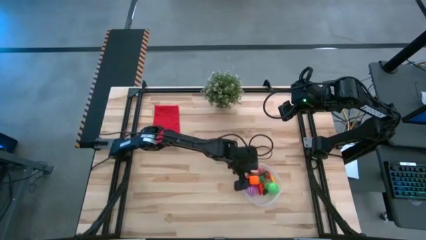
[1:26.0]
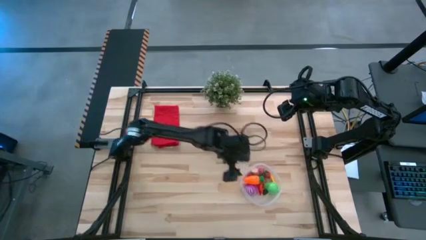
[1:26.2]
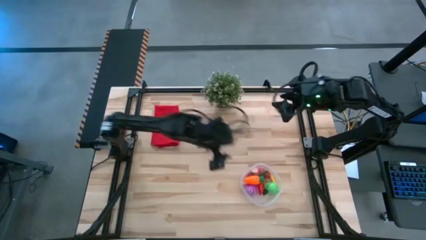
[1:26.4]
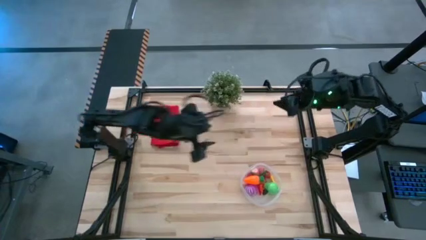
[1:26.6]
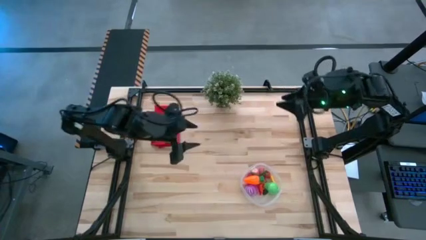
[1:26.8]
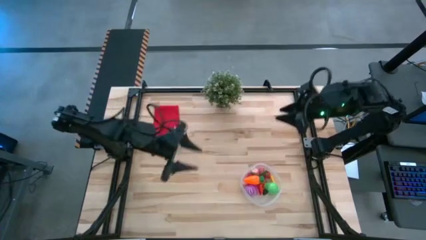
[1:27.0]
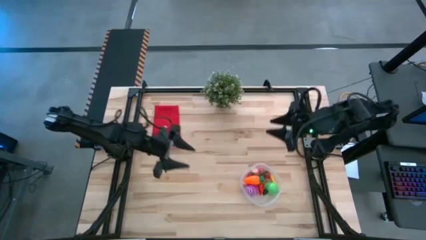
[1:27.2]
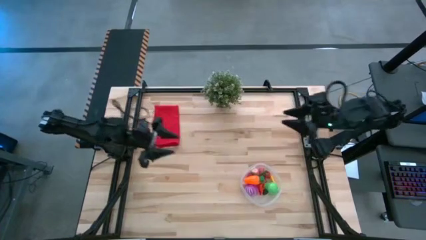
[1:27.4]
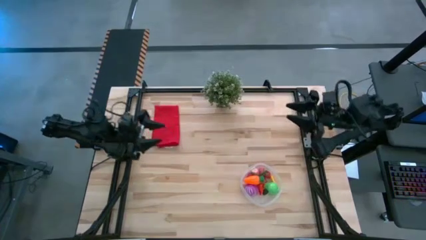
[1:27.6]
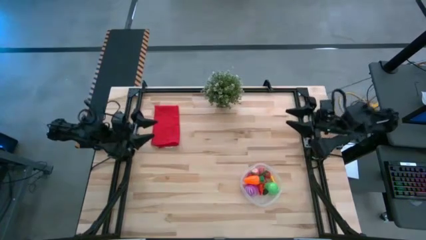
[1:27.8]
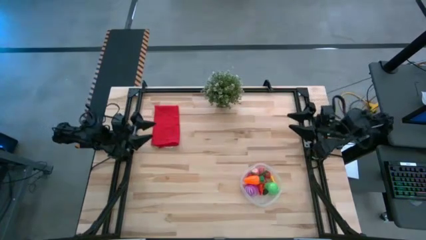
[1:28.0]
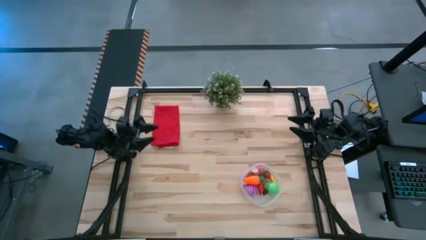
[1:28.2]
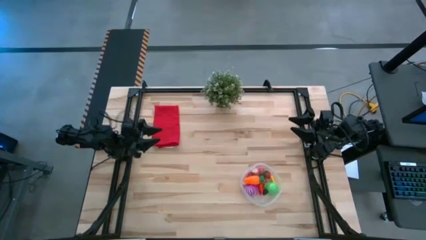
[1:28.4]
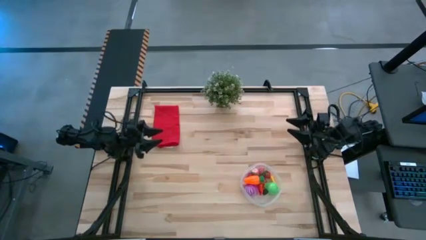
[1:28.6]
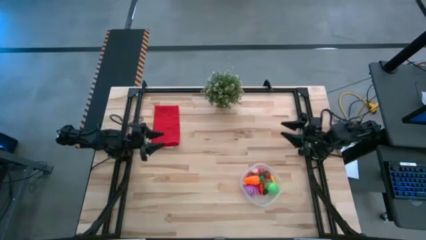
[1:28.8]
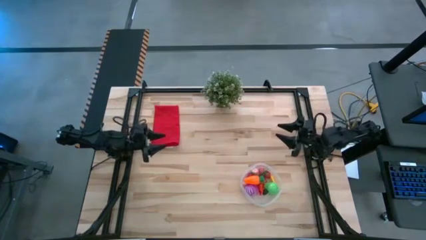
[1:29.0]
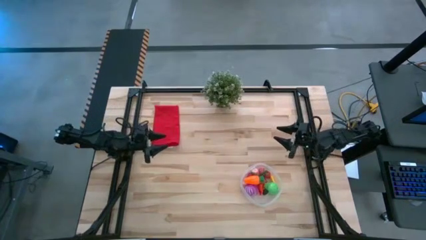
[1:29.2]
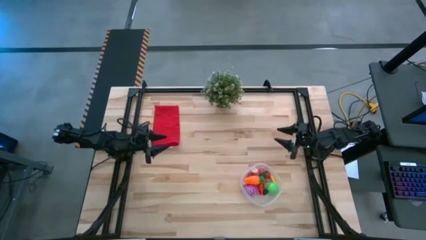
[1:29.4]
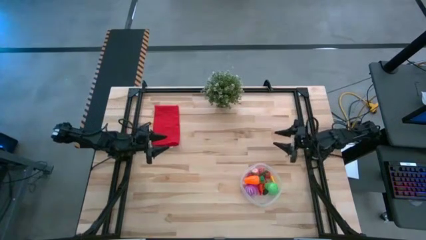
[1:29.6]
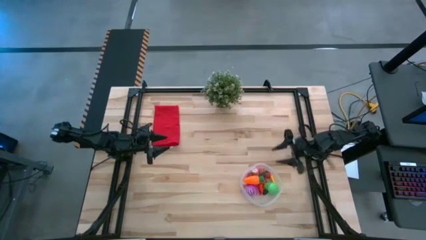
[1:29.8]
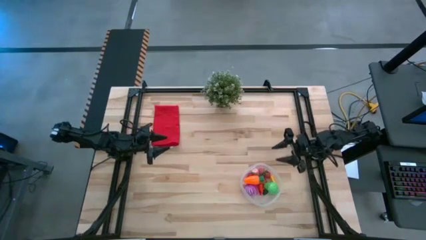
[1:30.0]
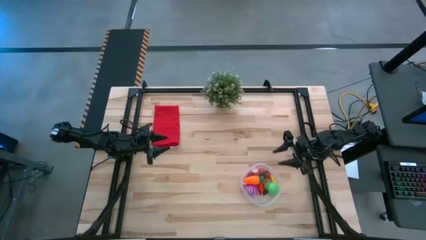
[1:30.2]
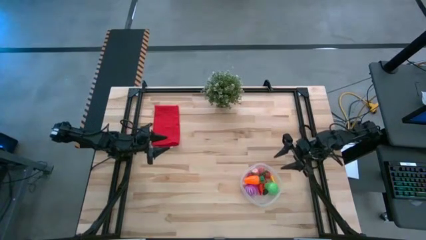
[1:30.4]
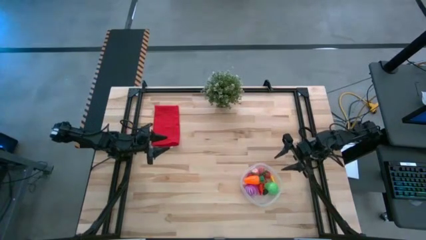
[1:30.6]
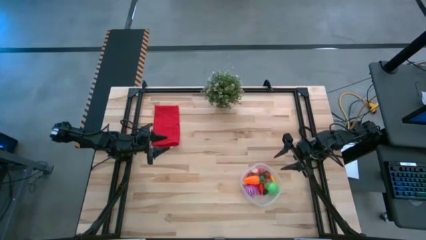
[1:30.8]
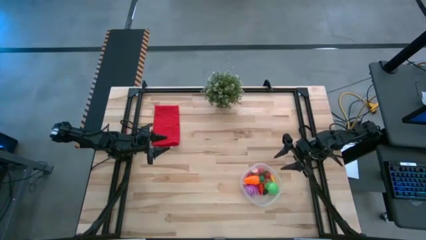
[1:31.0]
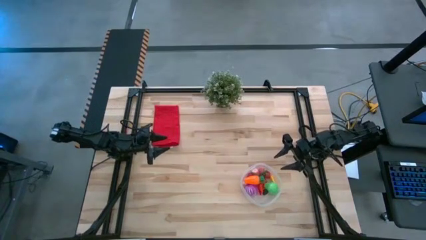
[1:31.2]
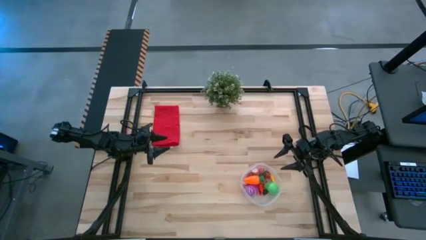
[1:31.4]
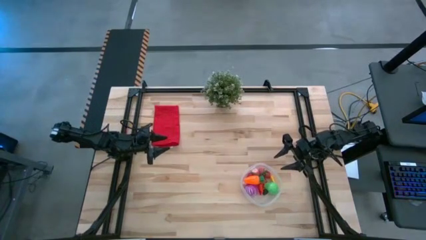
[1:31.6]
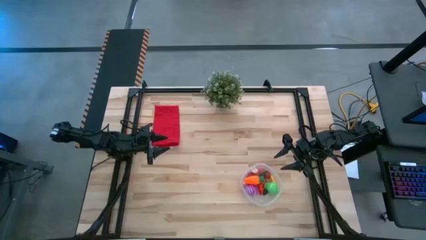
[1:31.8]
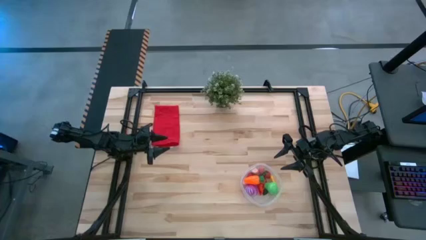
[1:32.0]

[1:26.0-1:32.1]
Task: Pick and placing Produce into tupperware
Return to Home Position

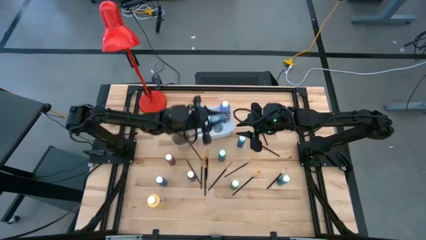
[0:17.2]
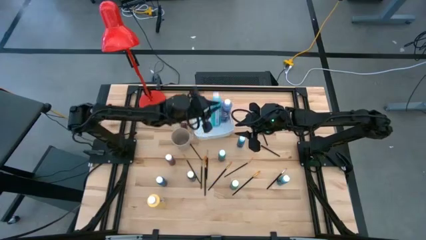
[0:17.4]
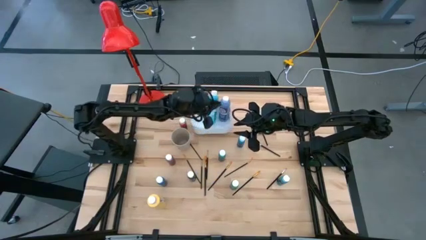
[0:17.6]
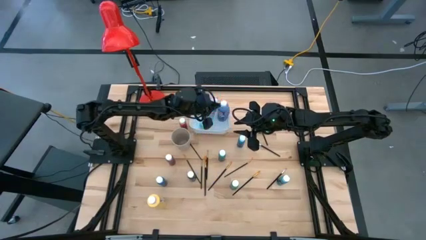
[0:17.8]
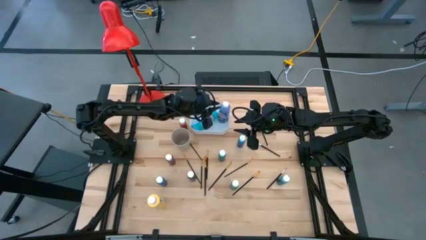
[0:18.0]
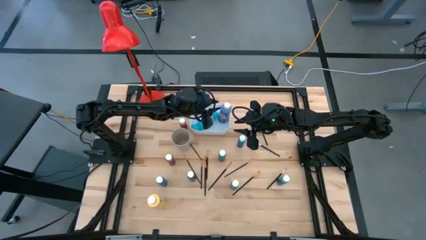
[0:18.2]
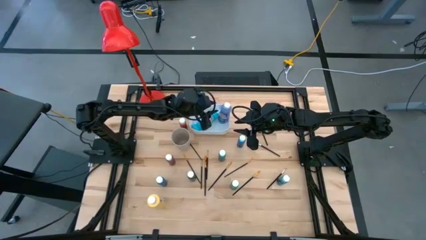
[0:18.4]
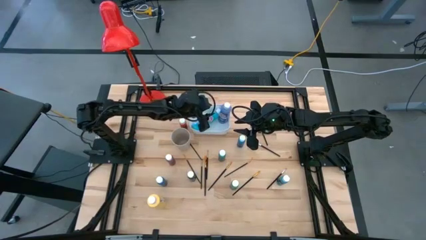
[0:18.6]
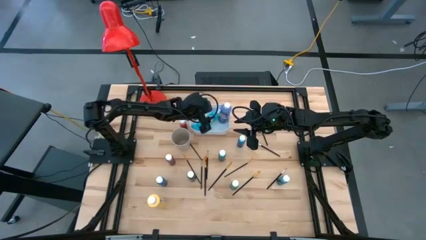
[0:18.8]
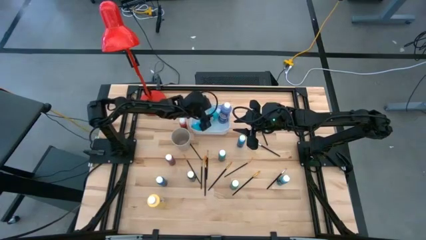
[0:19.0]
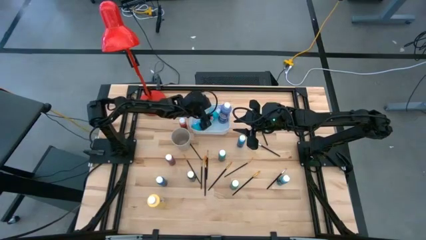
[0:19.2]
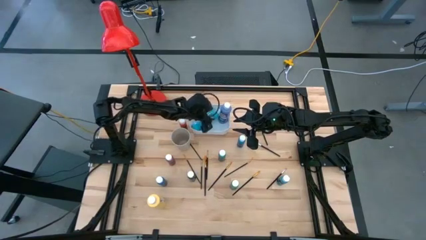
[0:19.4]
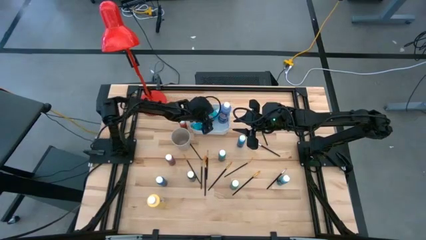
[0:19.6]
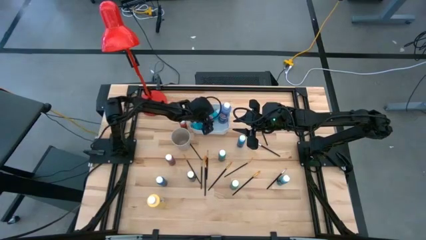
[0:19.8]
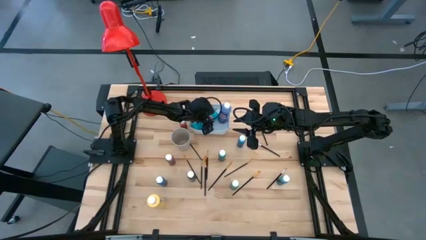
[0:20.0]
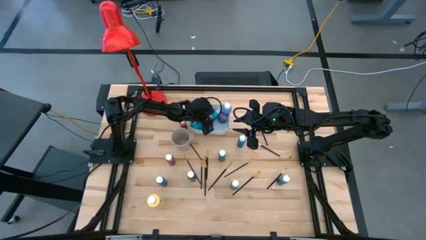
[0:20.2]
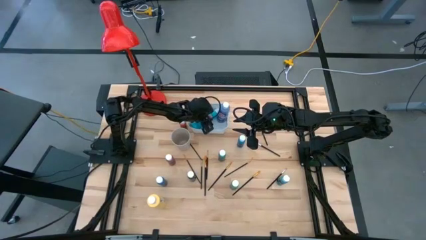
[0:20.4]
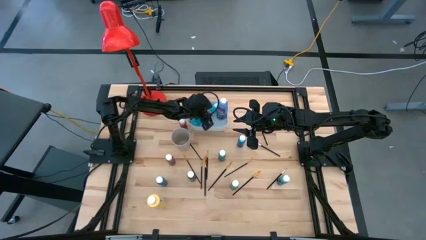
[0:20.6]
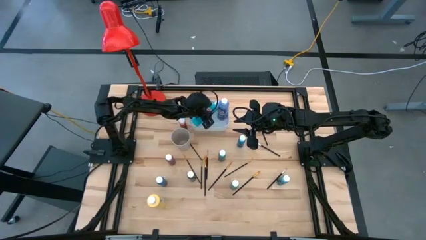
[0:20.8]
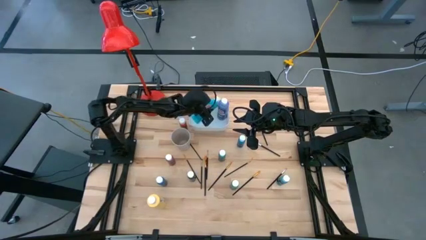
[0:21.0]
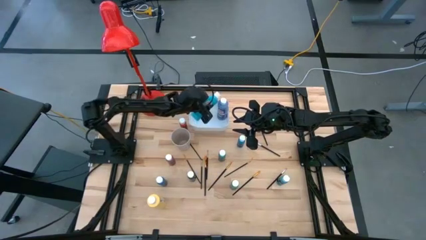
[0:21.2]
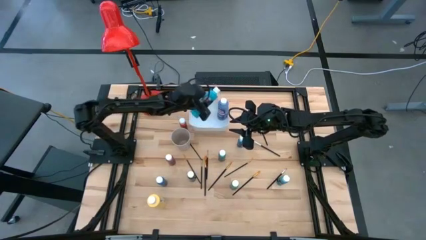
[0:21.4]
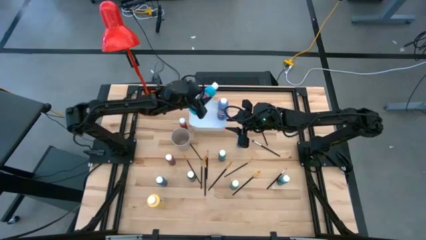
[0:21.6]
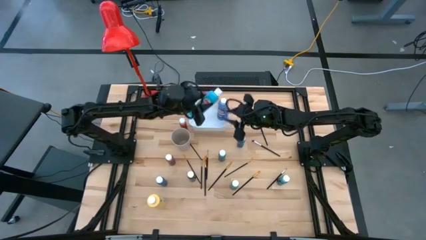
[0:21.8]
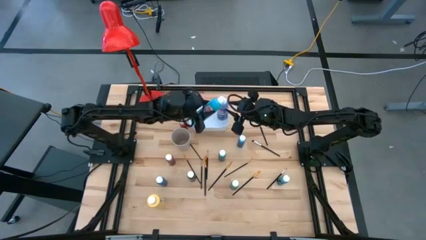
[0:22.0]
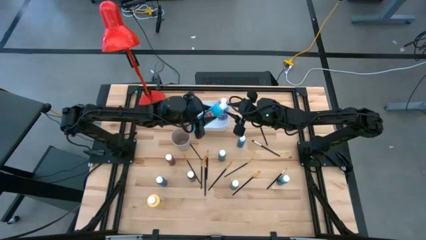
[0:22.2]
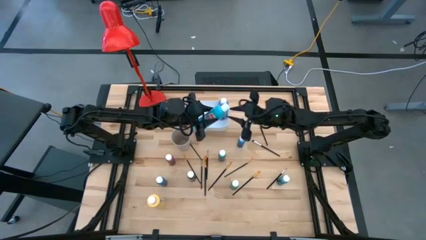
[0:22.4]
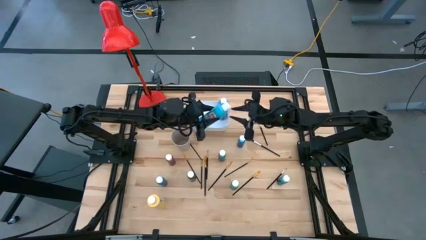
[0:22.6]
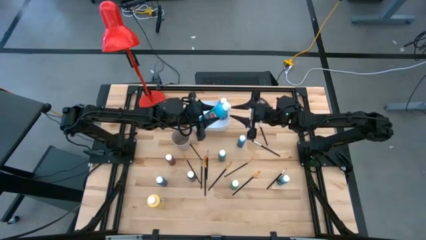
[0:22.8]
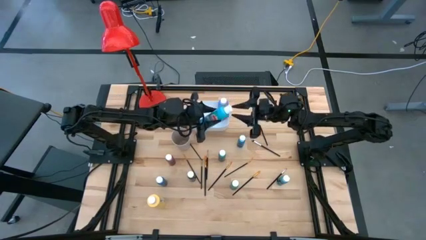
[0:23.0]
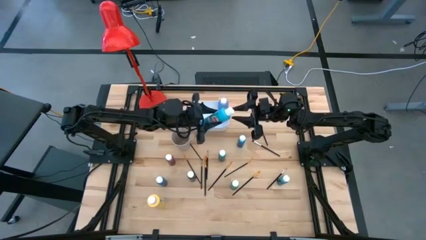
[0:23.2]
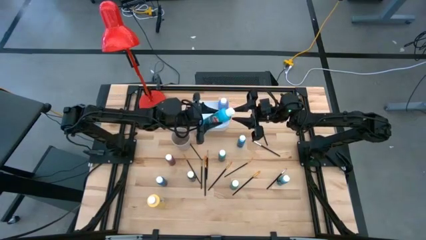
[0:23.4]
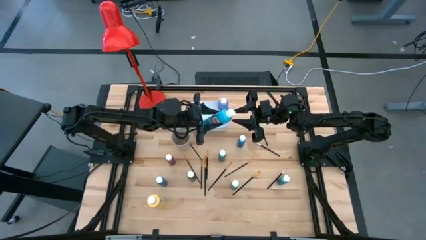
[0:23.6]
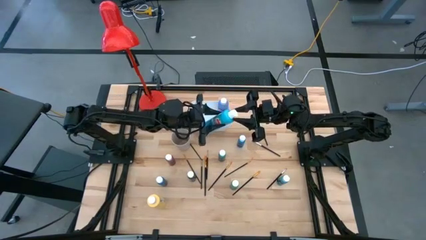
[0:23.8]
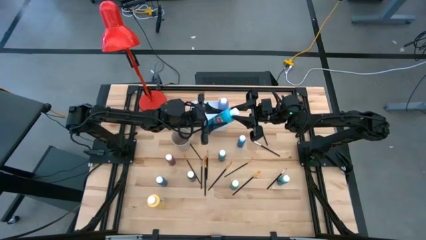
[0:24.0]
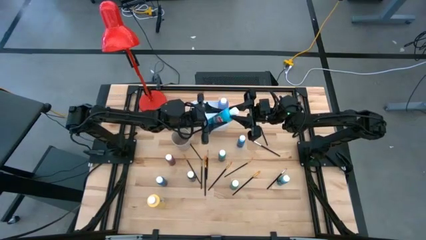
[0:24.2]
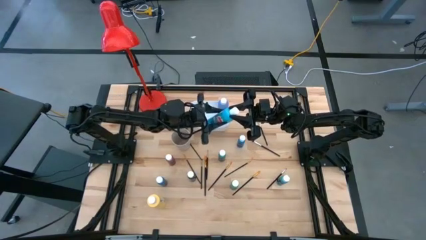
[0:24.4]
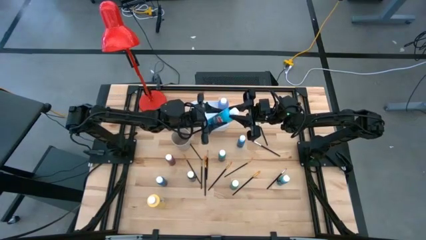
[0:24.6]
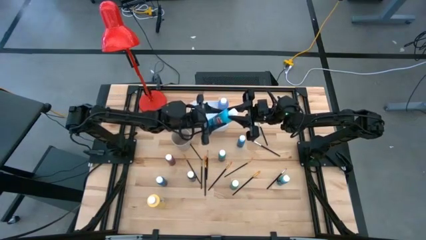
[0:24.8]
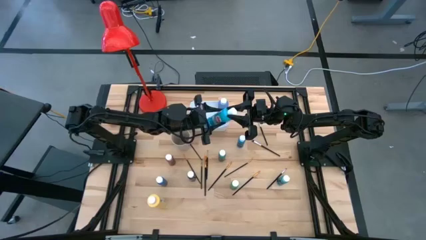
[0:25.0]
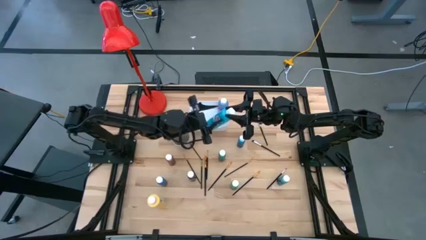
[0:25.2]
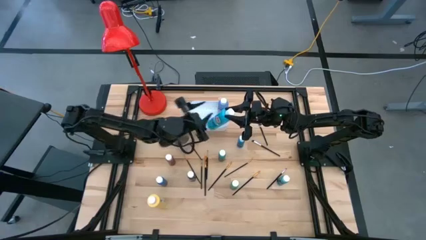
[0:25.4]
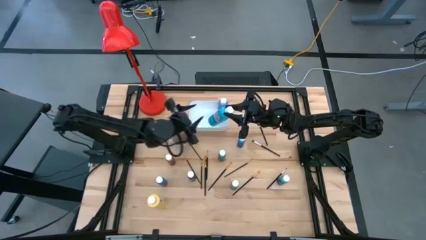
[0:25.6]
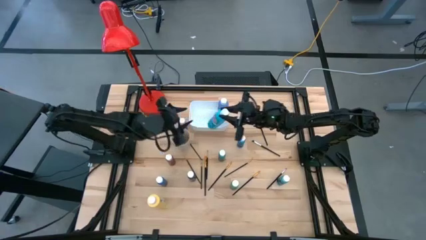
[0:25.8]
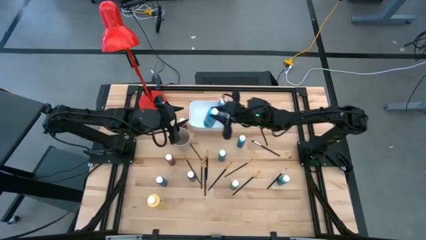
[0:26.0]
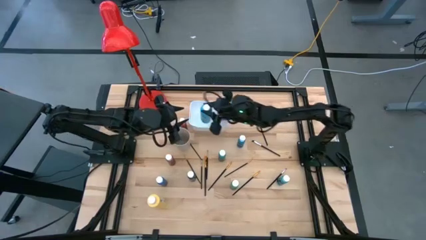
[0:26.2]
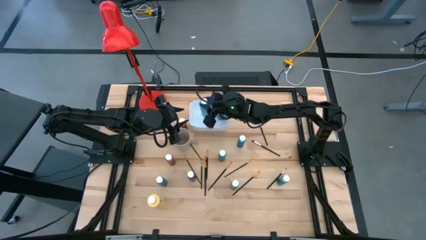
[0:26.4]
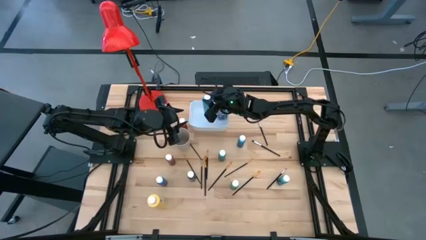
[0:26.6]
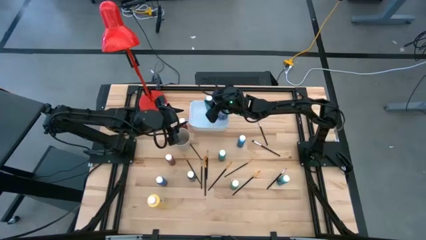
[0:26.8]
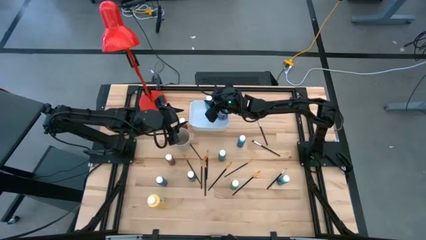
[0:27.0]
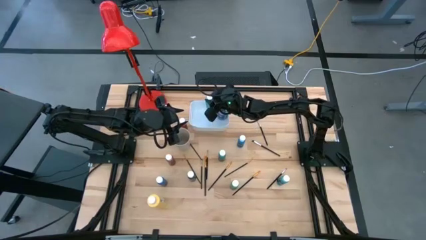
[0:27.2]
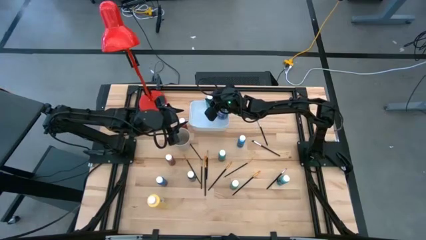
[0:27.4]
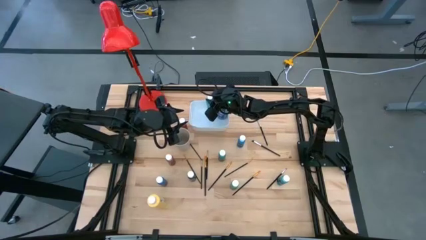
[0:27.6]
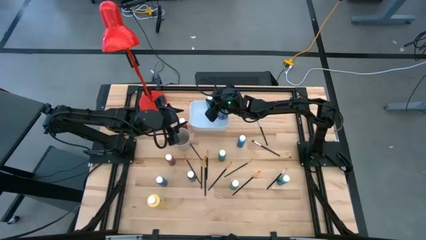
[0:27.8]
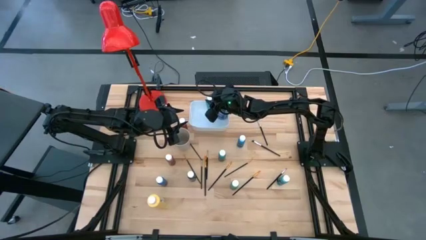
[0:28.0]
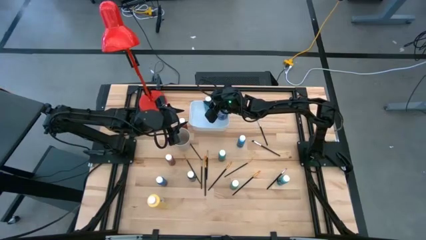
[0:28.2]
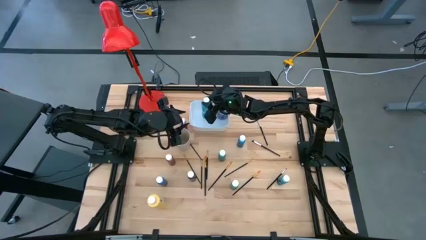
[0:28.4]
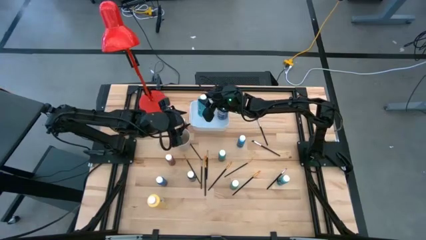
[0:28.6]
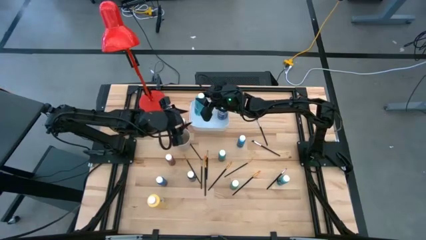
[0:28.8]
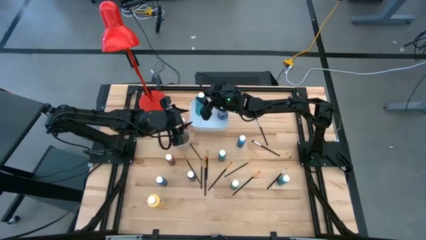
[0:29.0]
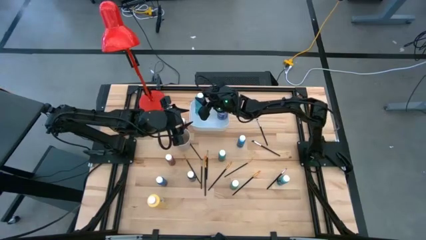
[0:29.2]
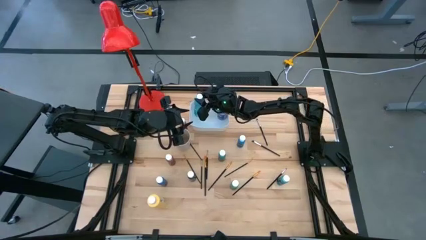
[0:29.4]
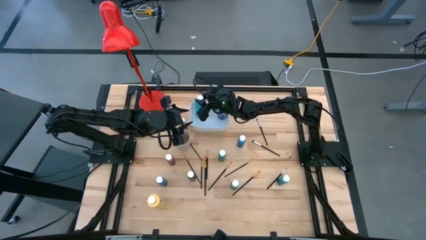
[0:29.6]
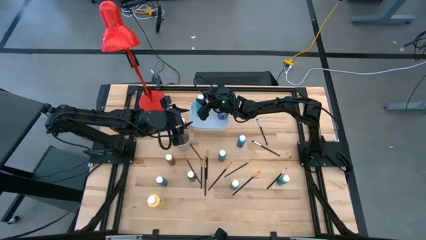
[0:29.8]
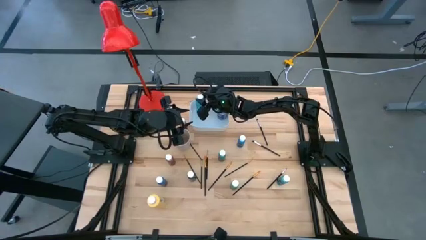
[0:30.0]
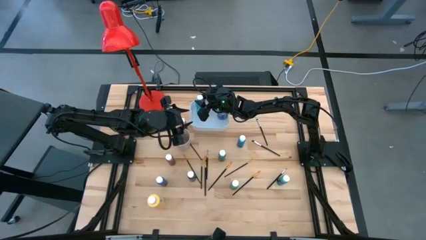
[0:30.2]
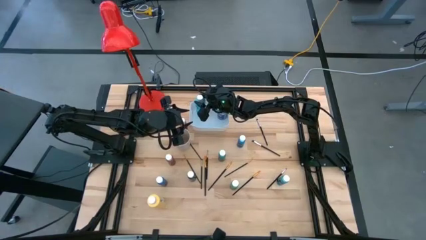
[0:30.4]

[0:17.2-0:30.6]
Task: Pick & Place Paint Supplies
Put the light blue paint bottle into the white bin
